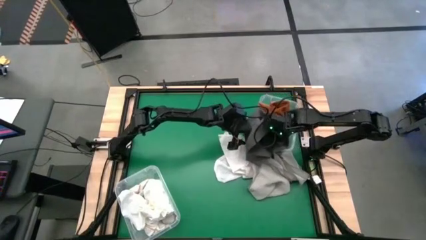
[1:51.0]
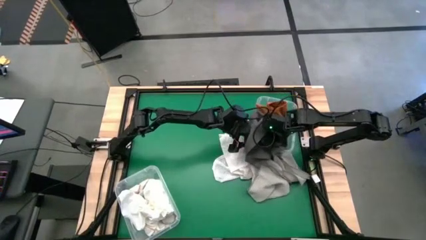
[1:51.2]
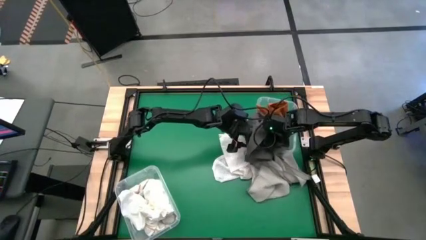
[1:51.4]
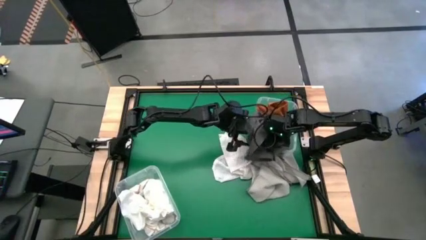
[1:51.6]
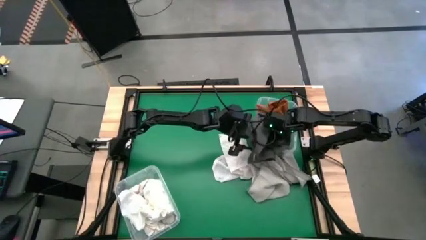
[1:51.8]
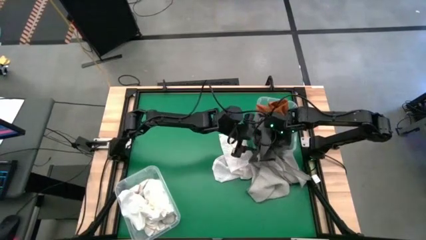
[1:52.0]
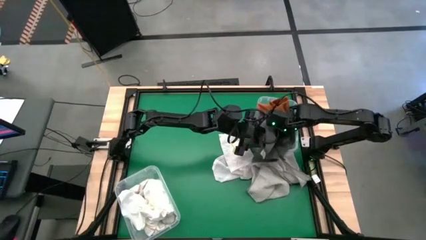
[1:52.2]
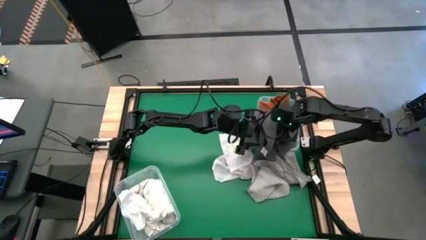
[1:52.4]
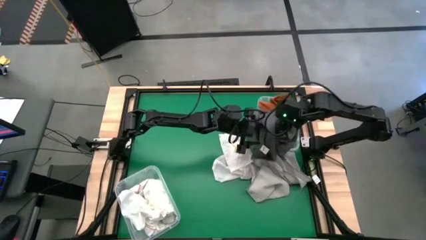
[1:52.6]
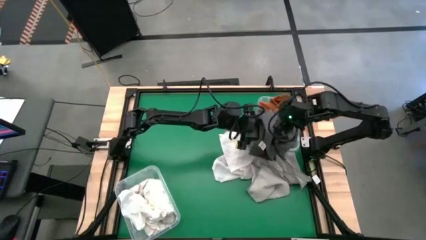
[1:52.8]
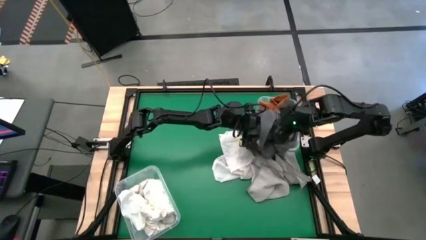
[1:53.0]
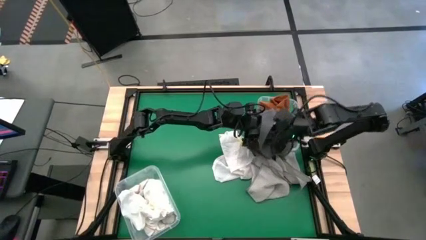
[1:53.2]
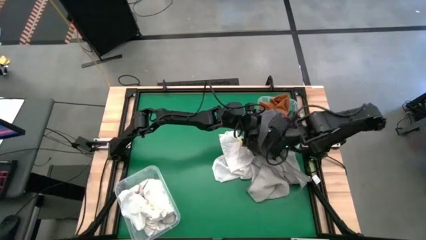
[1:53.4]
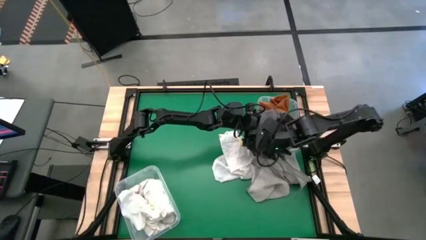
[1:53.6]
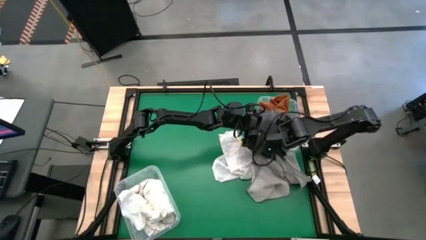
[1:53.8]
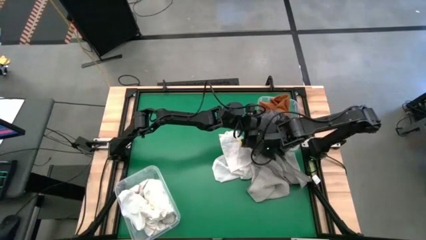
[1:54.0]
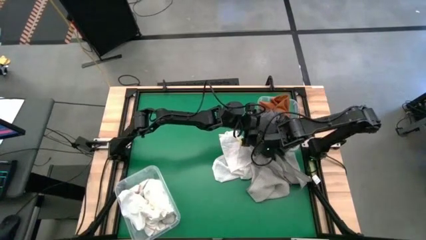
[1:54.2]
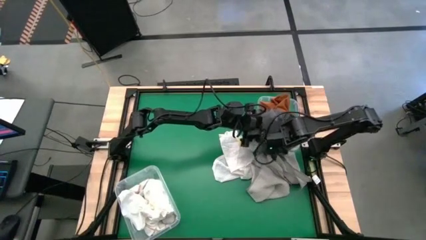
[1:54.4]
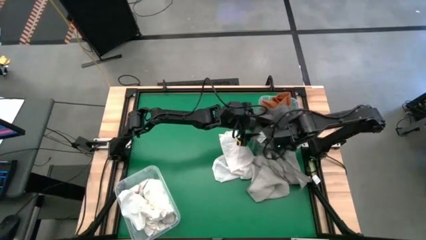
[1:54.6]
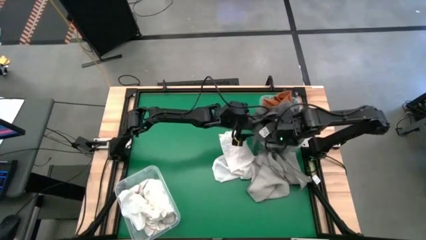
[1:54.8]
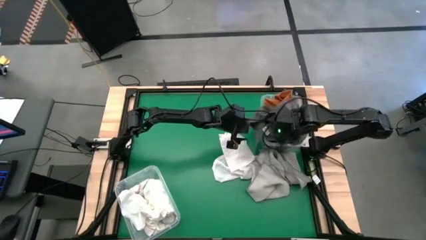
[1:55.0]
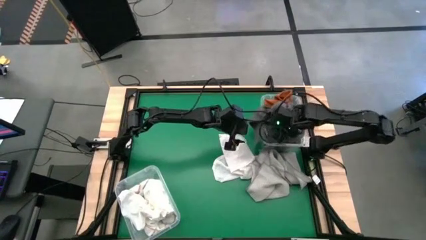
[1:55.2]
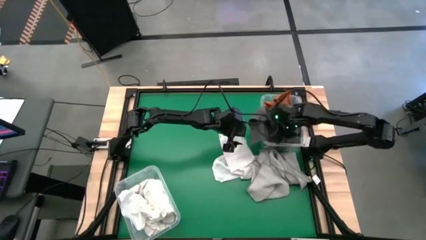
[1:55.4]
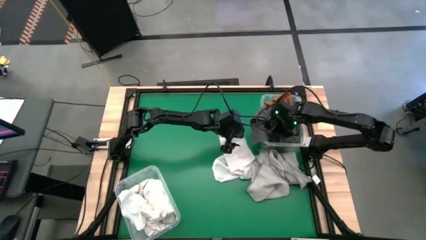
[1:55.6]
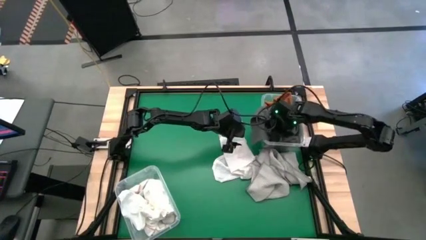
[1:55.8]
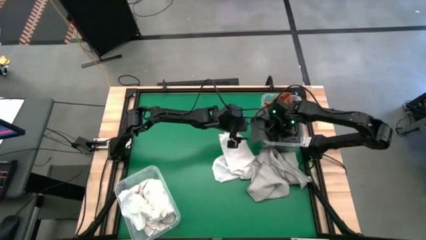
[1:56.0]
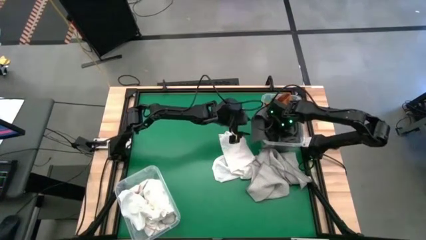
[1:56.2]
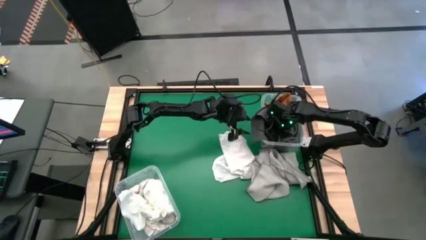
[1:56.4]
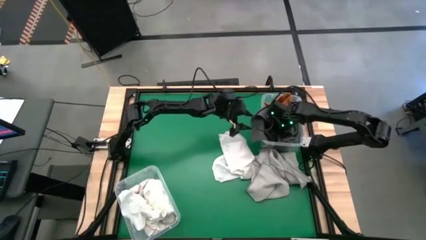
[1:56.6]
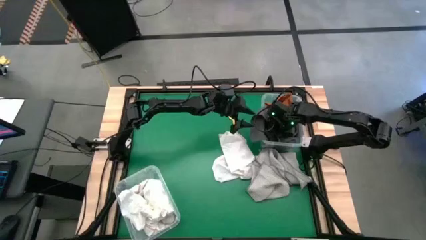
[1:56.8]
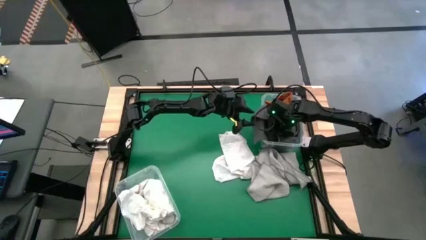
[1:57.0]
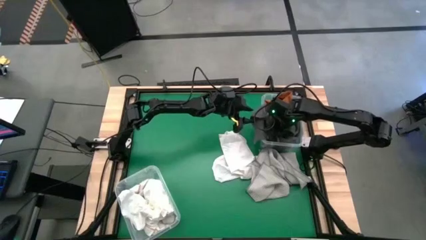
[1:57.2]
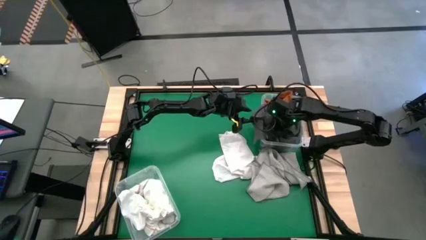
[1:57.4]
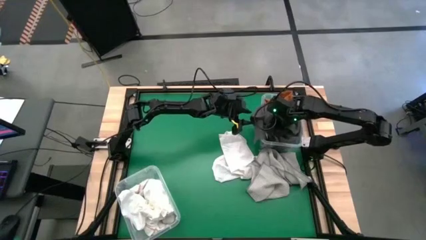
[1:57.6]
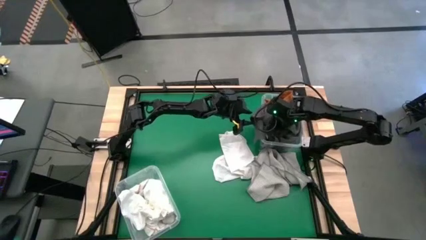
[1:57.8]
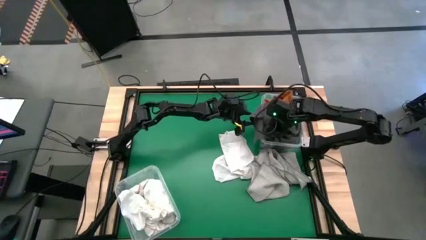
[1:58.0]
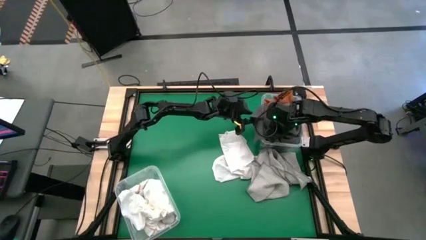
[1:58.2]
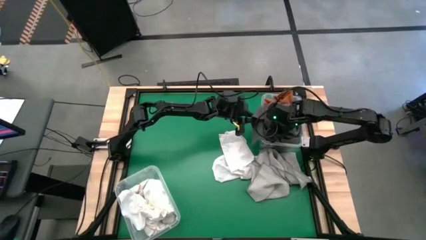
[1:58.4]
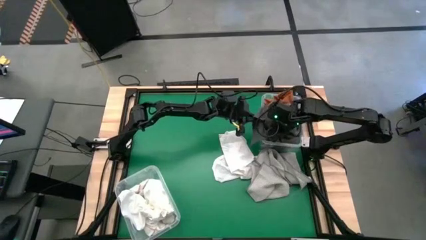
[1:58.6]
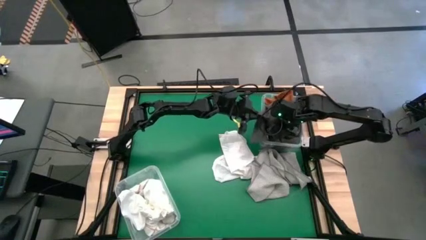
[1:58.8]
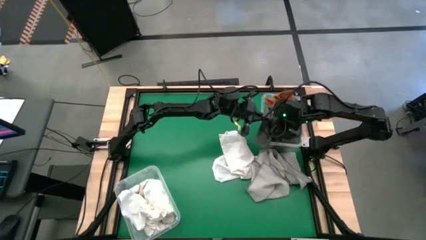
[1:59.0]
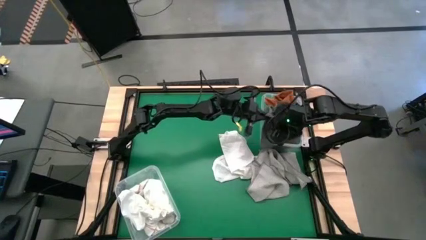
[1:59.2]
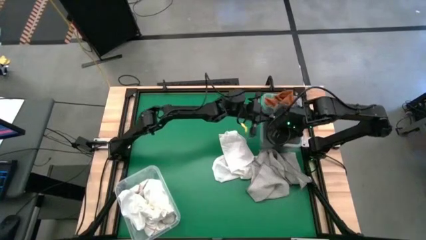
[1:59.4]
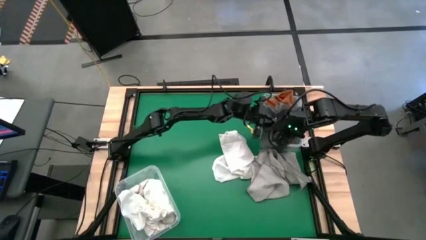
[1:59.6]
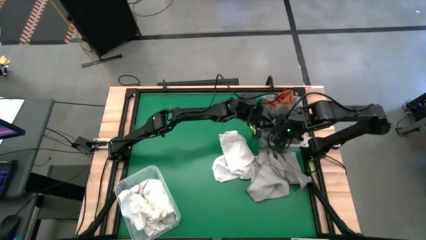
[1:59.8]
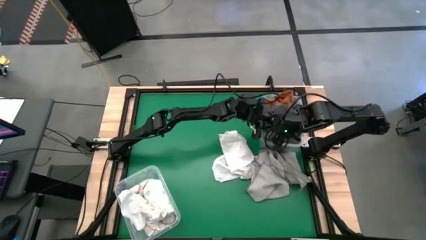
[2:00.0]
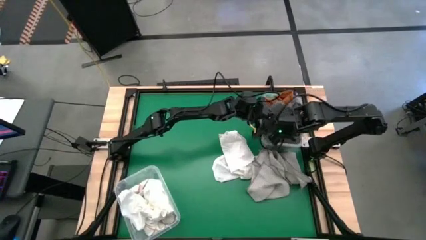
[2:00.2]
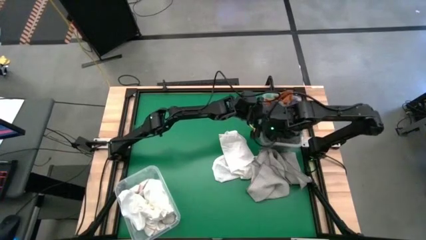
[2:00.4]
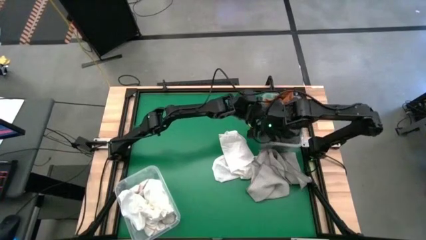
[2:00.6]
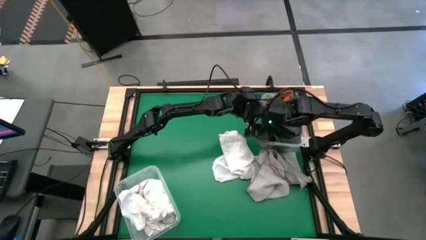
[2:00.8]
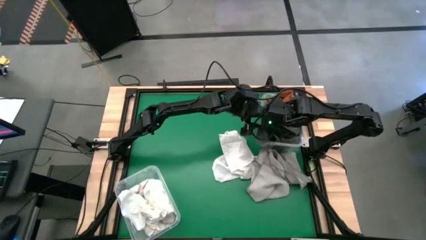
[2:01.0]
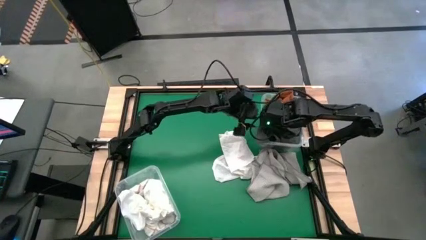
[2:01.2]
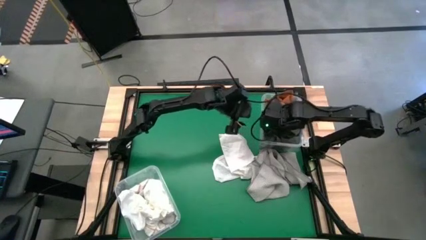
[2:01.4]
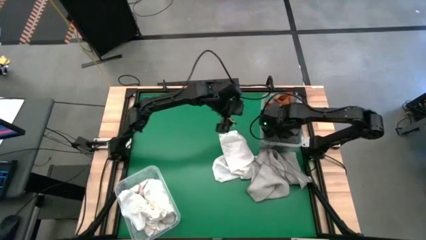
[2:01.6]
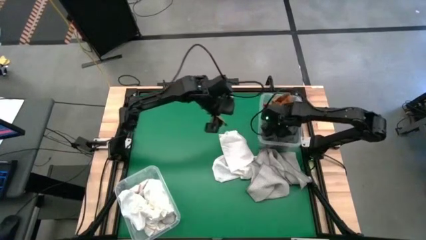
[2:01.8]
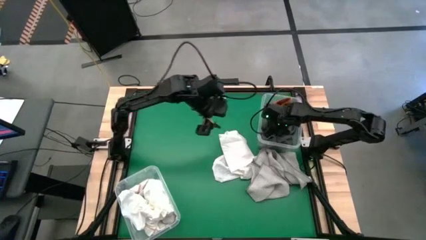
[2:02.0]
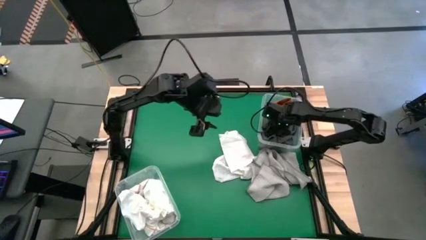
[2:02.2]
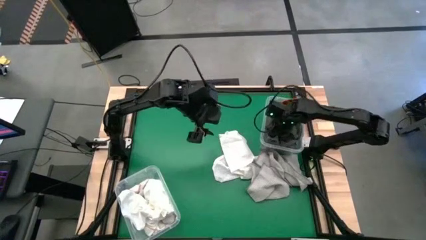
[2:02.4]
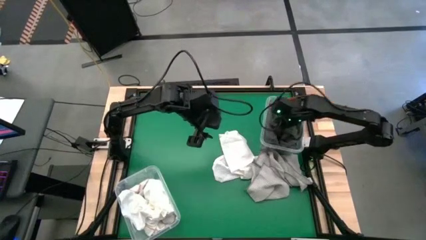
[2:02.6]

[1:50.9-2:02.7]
Task: Sort towels by color in basket
Put the gray microfiber towel into the top transparent bin

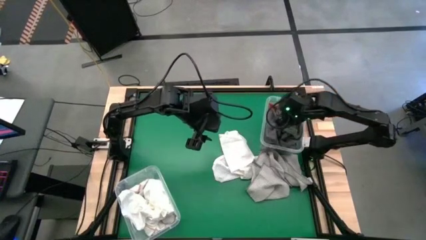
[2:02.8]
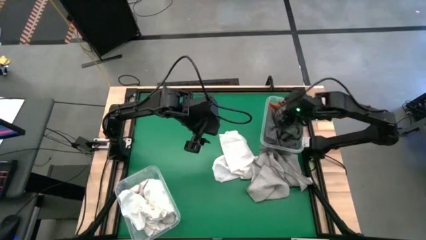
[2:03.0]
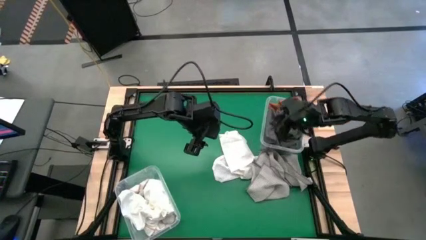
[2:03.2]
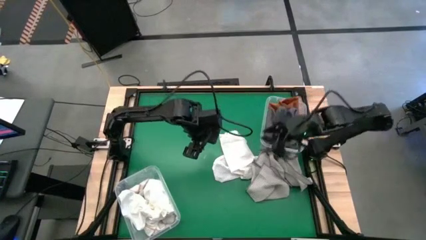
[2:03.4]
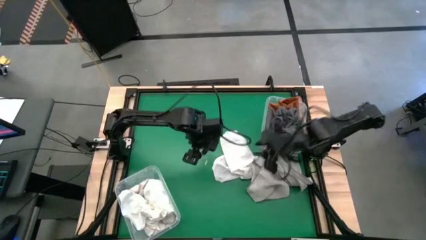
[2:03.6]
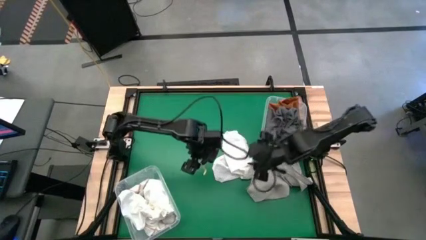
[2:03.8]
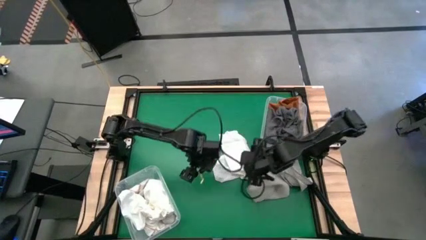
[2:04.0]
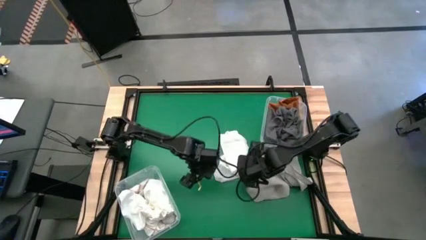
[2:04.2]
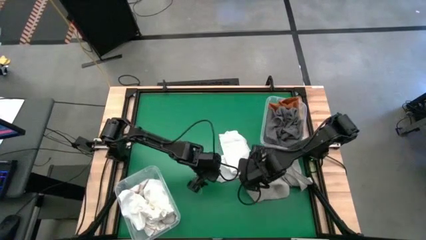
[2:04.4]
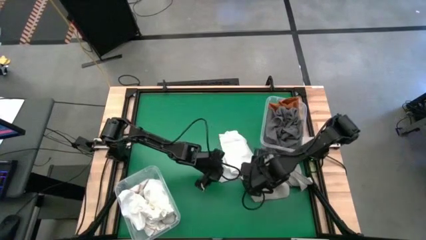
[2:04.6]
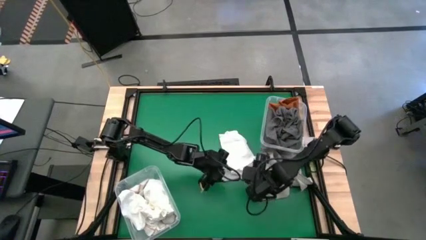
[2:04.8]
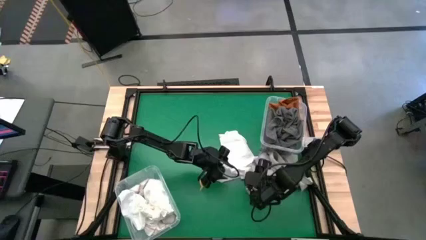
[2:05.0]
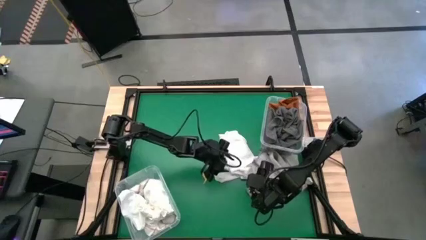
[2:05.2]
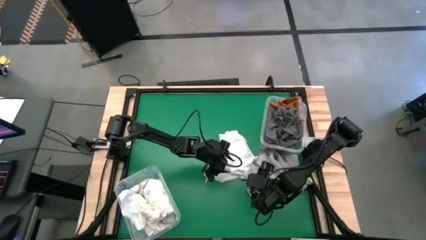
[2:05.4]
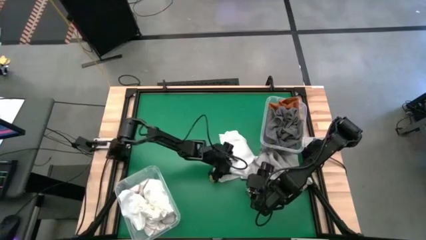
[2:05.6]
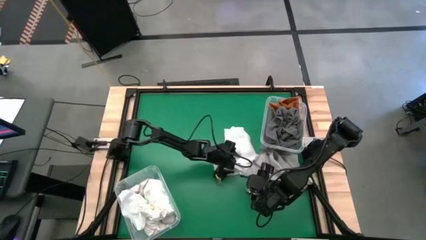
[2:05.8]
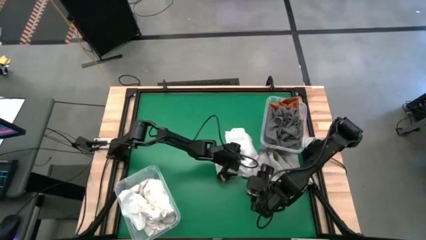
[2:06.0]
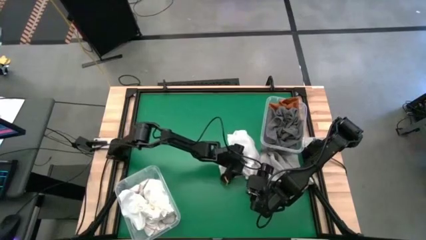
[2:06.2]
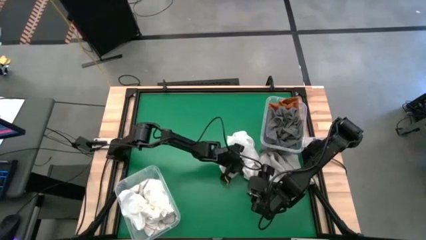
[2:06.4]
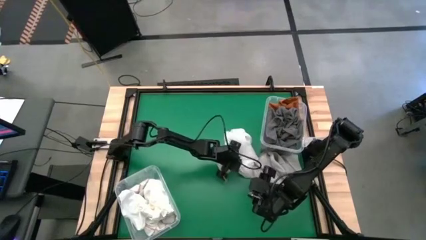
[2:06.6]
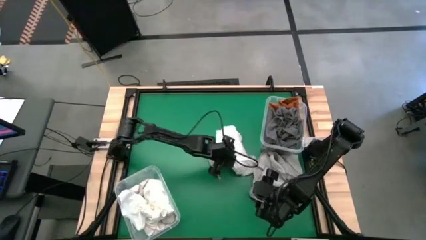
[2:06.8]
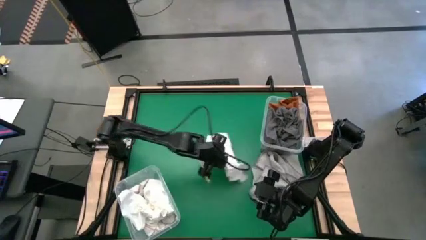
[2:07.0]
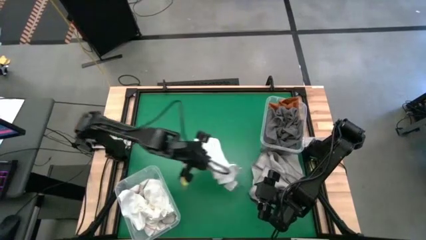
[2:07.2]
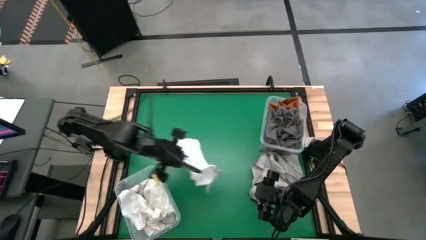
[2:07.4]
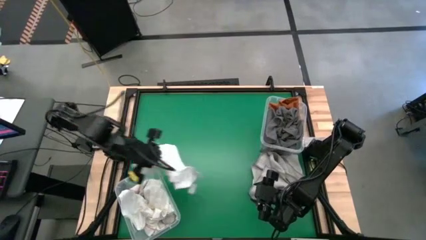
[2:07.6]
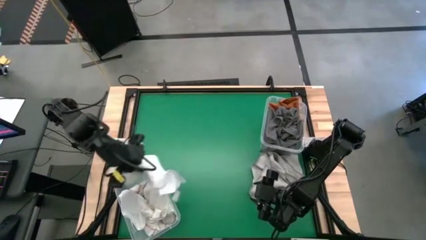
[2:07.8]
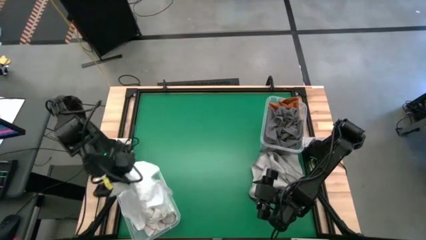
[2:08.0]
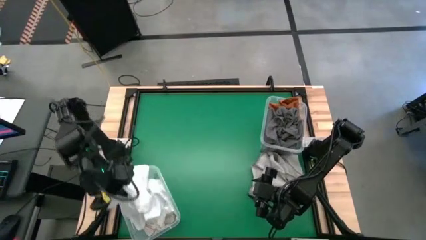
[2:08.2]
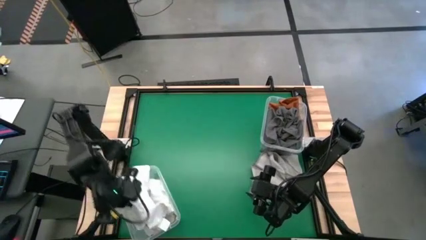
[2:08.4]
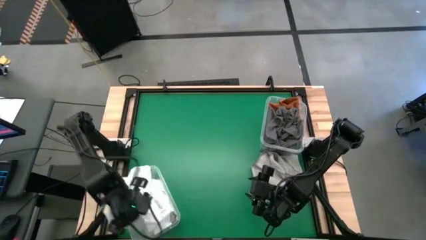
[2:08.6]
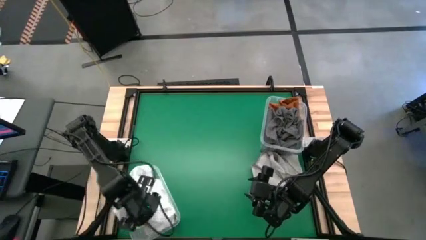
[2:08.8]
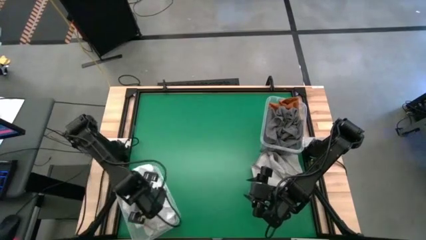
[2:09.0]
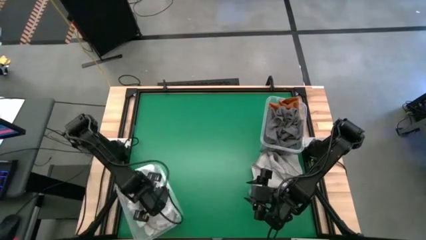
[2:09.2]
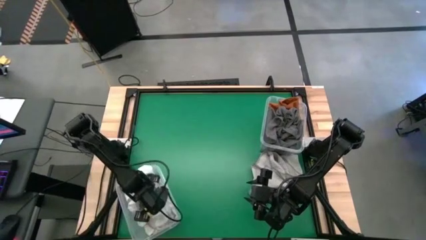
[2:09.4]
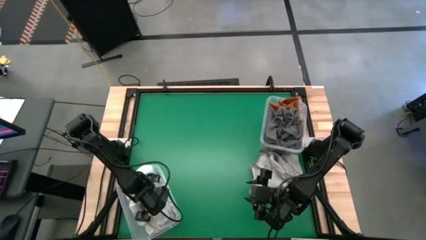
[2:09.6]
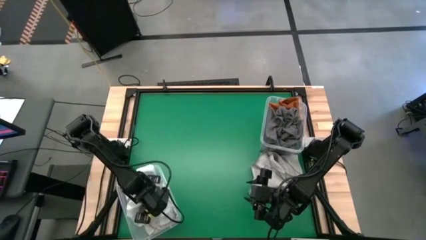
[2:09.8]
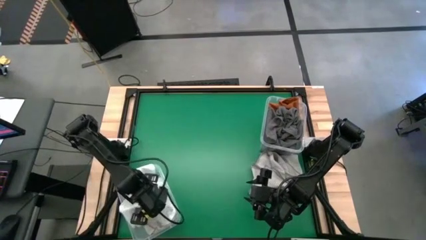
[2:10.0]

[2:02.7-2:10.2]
Put the white microfiber towel into the bottom transparent bin
